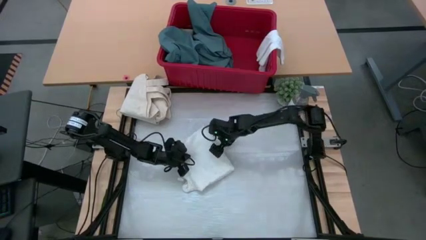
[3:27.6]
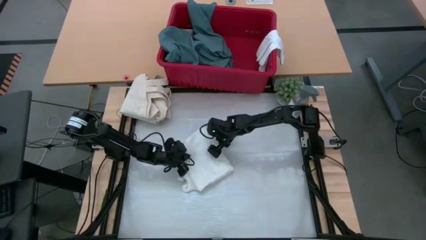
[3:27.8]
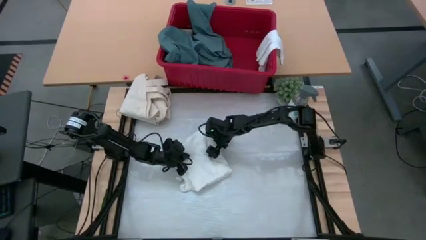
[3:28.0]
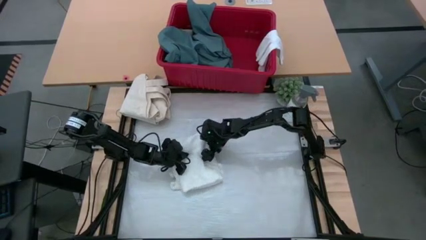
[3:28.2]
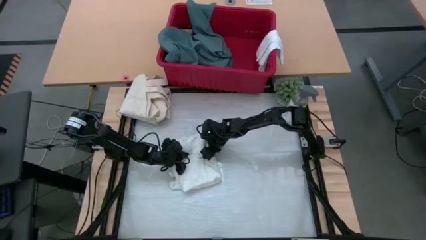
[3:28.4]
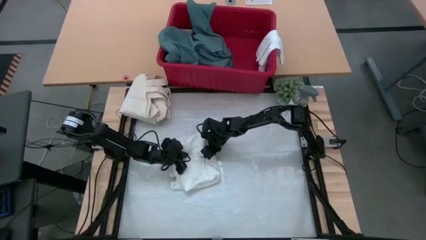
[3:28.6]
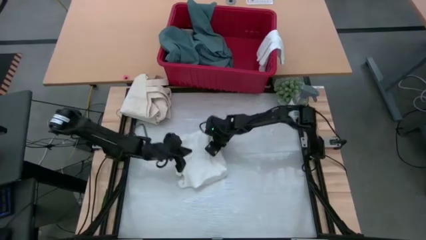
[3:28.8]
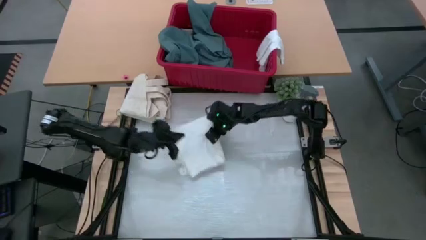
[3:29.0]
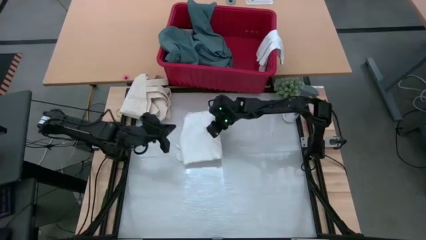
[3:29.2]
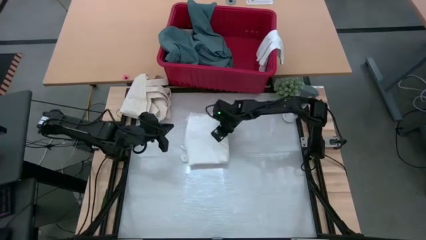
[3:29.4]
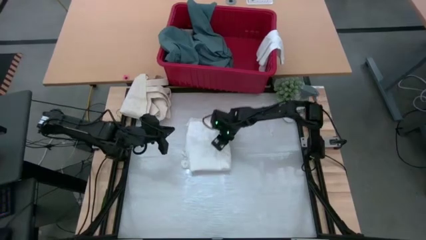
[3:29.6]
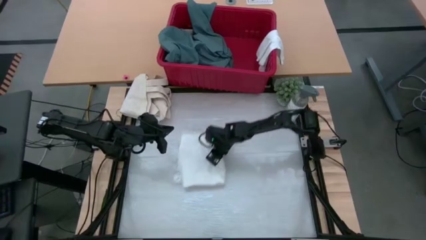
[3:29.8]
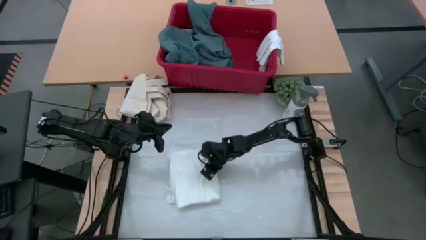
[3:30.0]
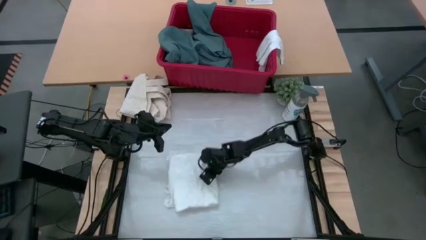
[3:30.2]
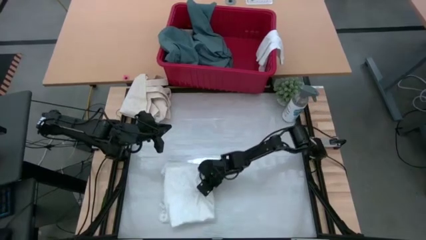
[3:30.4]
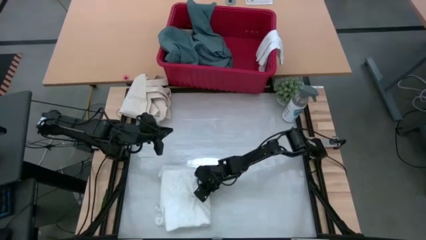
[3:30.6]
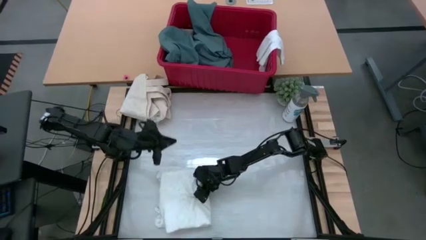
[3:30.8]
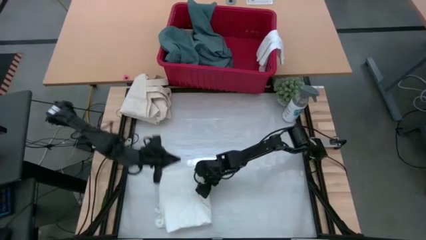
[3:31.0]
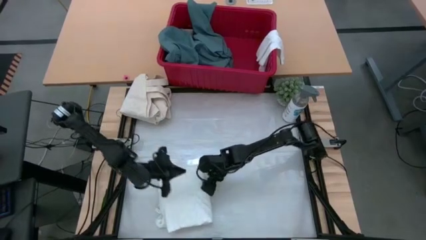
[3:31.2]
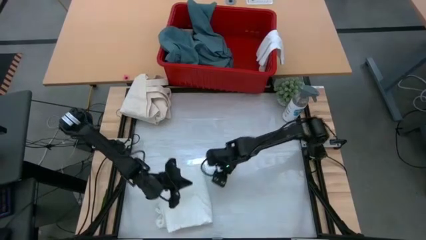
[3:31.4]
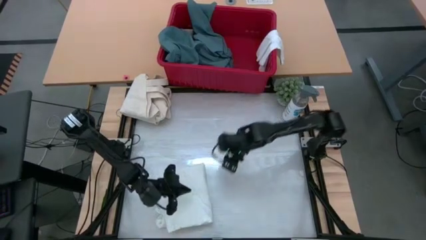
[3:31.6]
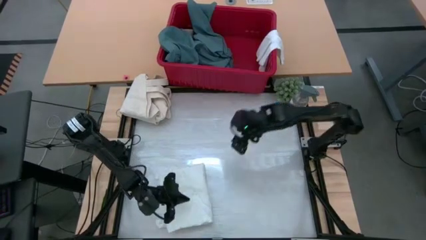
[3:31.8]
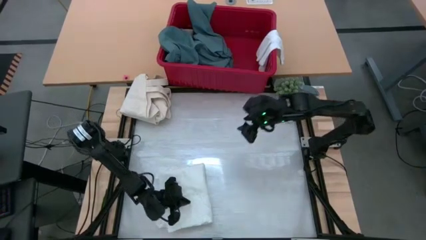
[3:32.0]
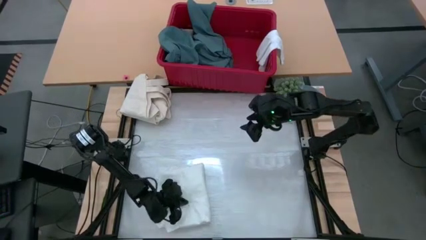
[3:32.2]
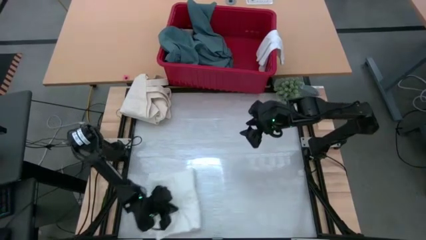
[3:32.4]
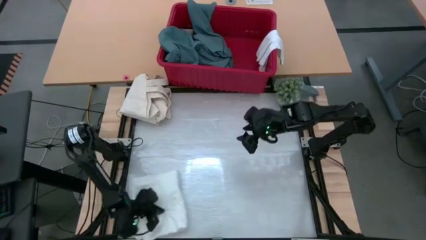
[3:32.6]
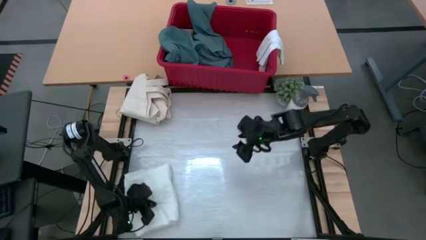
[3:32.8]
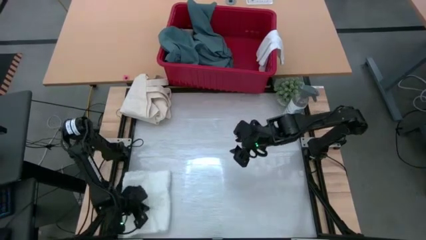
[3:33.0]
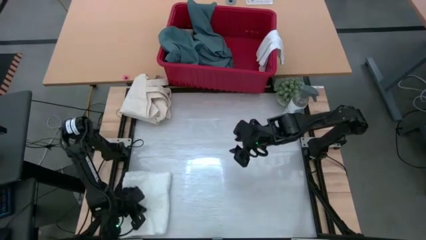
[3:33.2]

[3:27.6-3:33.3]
Task: Fold Laundry from Bin
Move the white shirt to the bottom left of the table

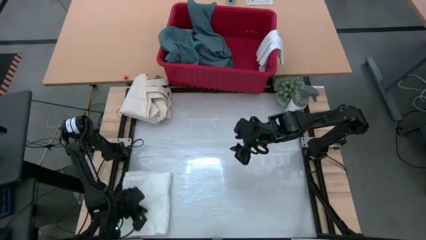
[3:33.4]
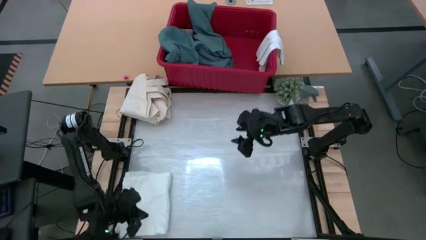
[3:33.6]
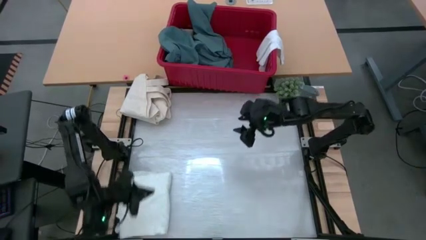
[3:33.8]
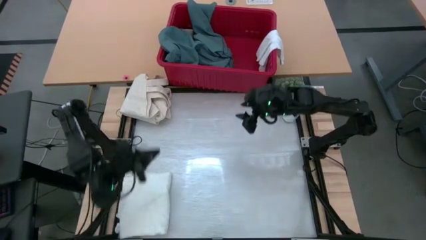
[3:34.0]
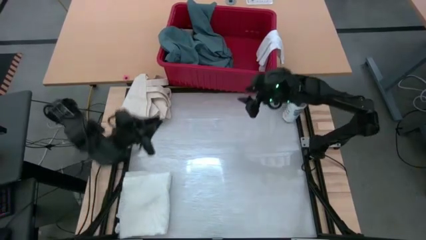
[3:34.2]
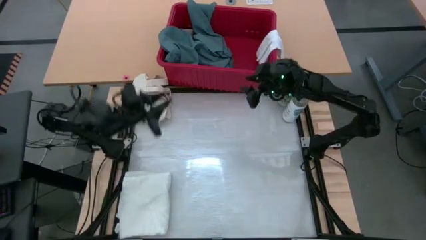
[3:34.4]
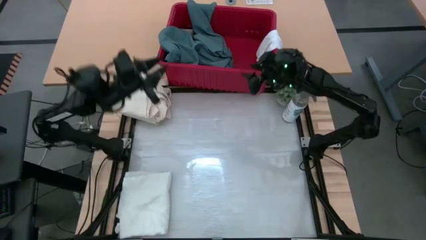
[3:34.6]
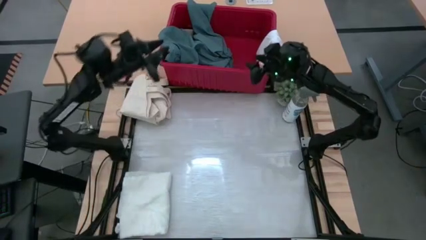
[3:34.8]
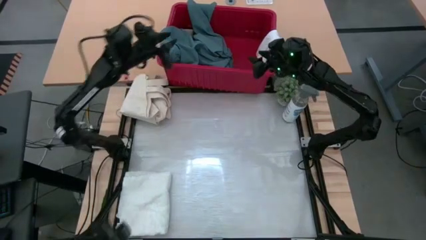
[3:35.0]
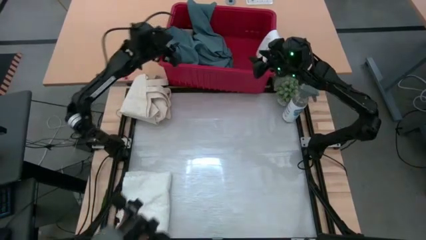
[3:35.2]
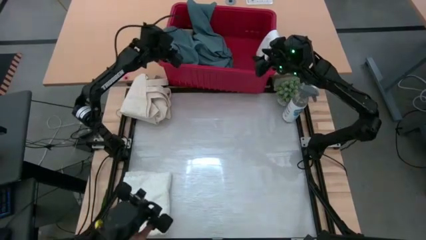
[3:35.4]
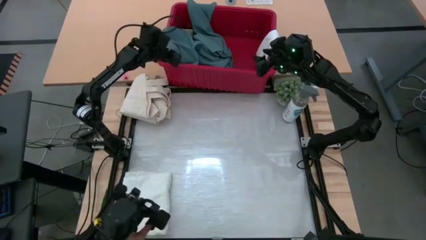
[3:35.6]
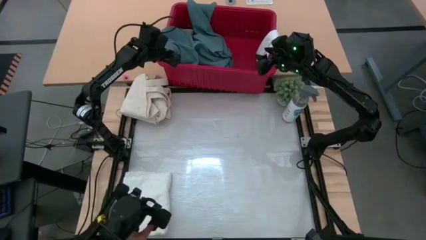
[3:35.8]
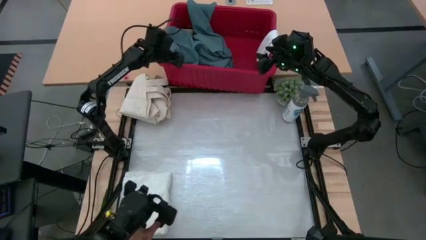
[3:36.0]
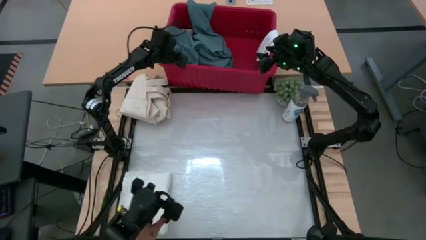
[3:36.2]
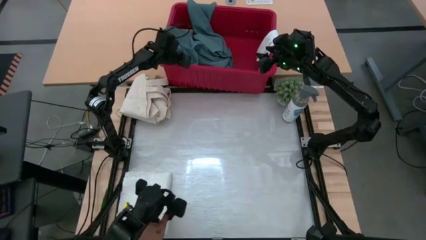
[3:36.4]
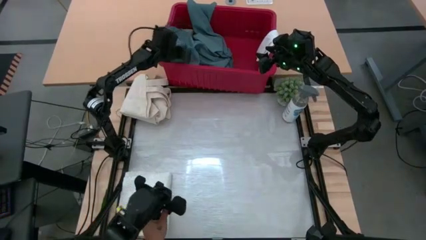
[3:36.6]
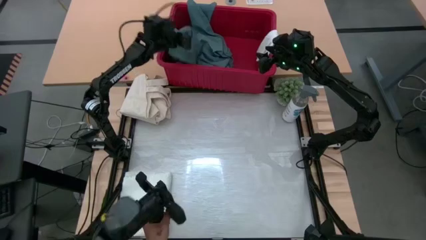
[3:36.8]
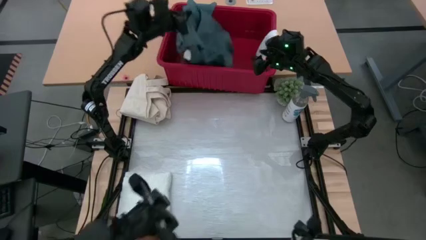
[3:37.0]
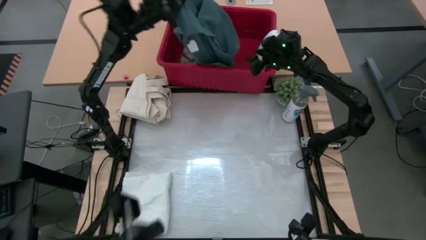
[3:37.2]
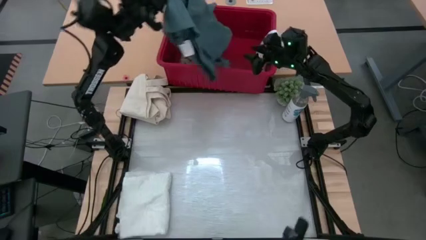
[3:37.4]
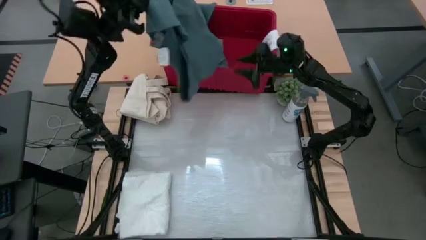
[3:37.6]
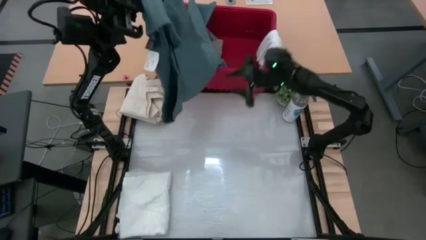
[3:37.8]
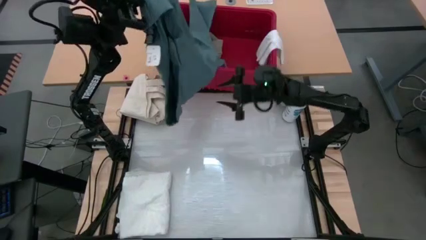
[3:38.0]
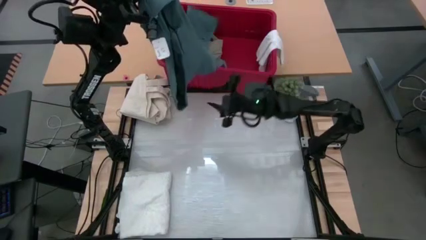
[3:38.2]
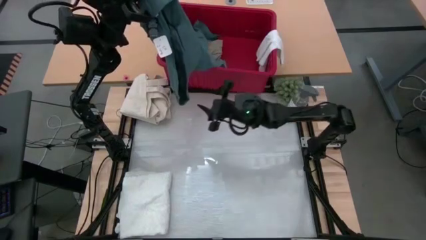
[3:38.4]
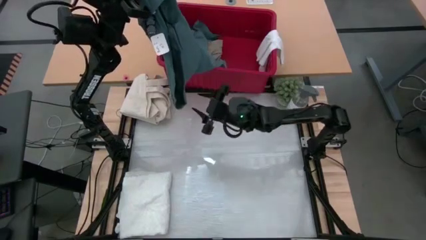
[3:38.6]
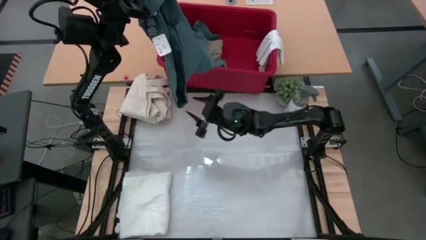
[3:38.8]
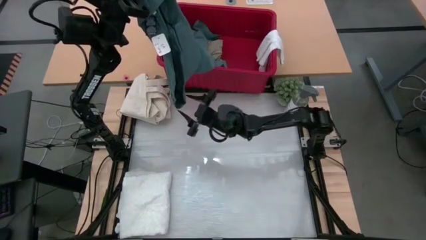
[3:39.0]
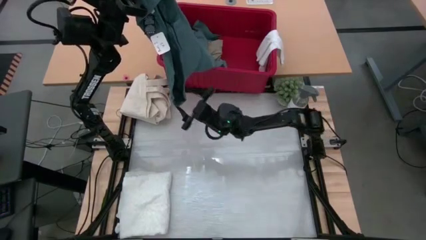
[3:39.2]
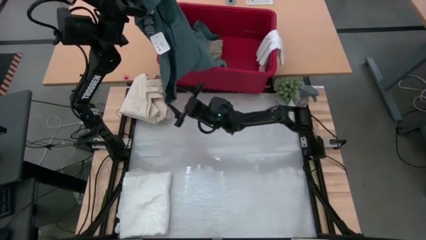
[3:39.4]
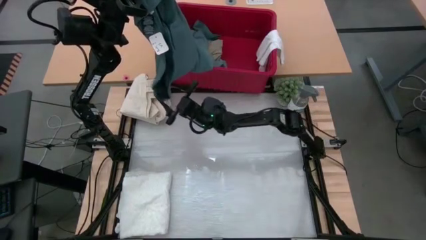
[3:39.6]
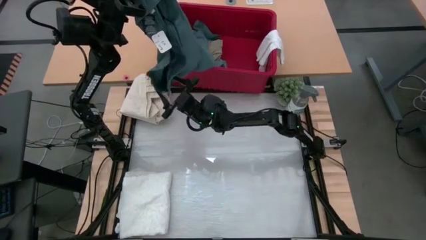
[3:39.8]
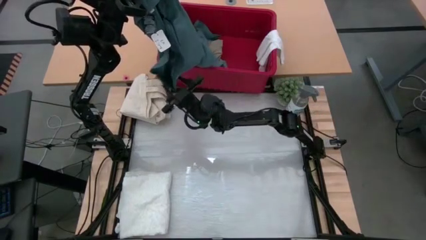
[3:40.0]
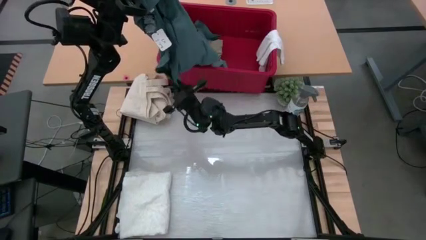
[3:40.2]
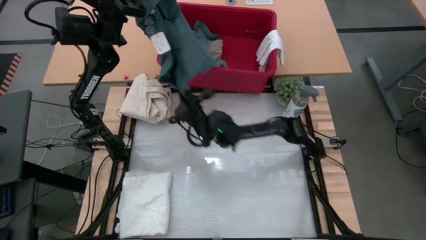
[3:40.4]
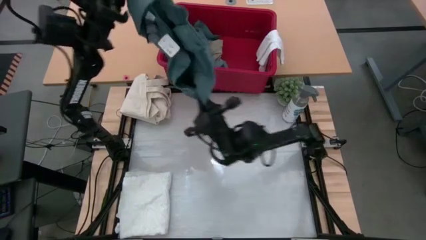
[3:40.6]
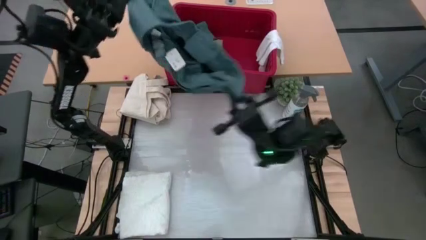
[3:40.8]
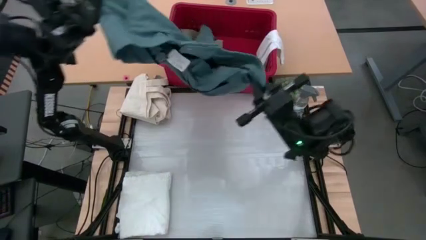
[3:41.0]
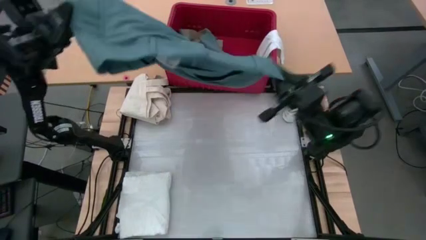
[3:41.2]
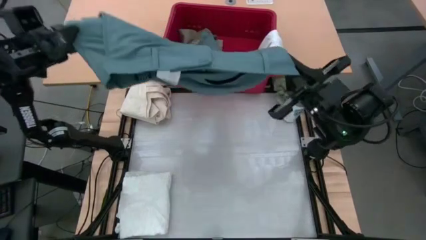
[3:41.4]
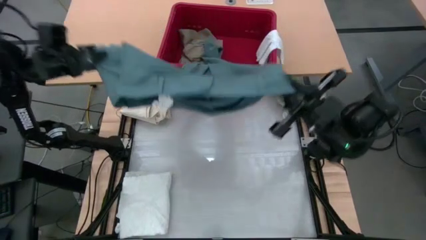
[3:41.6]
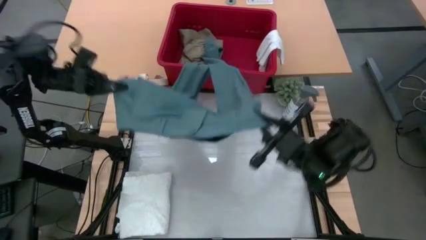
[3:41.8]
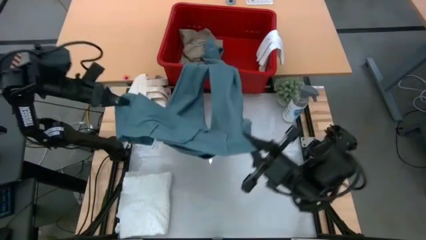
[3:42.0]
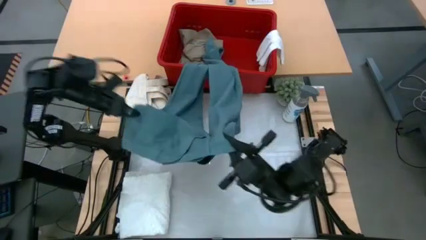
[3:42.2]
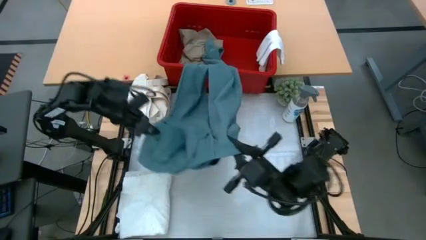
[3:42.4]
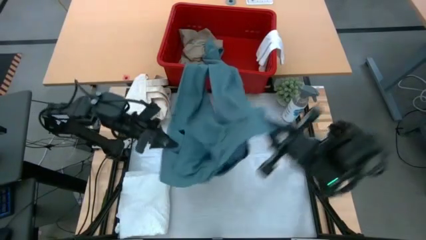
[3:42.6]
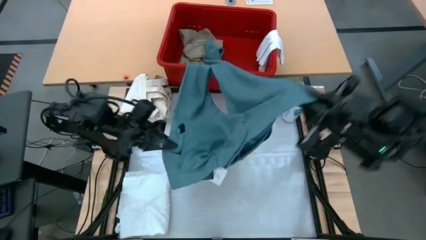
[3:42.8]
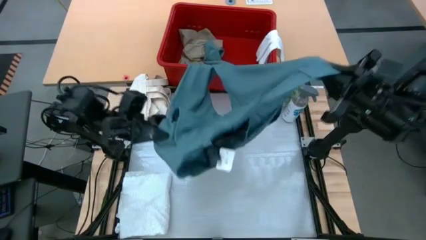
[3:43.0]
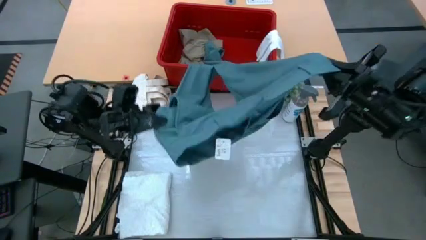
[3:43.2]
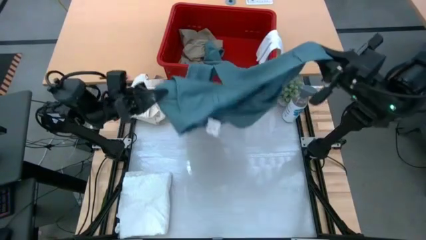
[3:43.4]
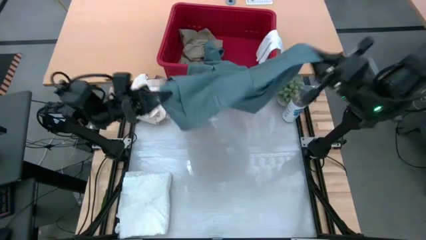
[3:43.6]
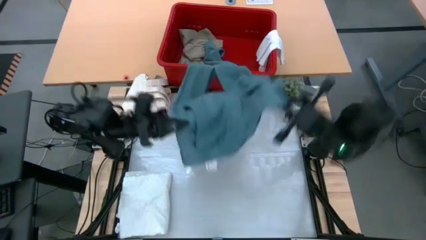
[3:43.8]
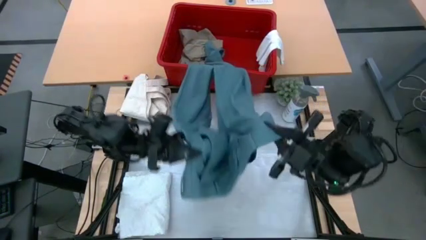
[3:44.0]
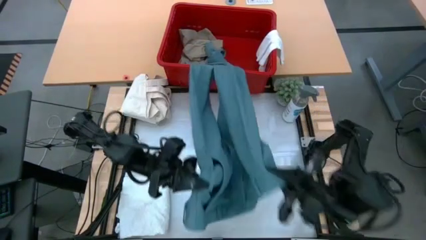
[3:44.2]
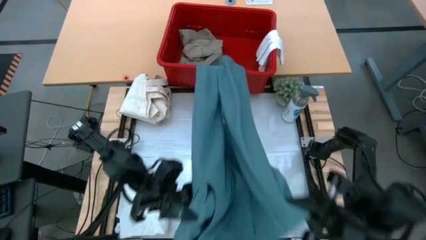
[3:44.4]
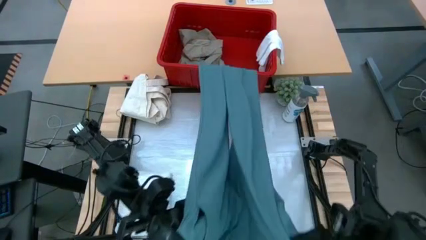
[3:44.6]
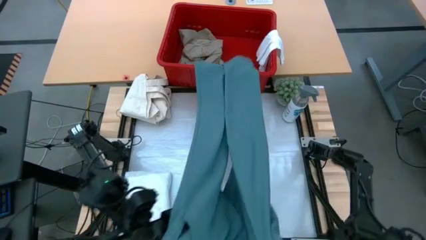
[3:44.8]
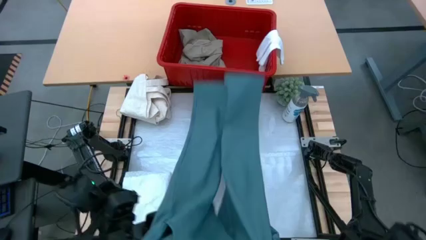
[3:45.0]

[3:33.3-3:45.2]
Put the blue pants in the center of the table
